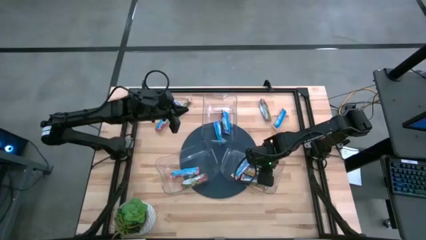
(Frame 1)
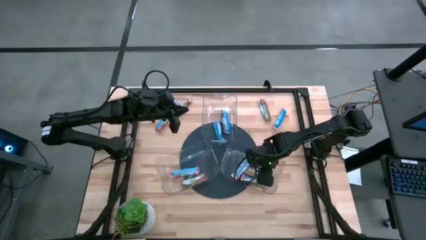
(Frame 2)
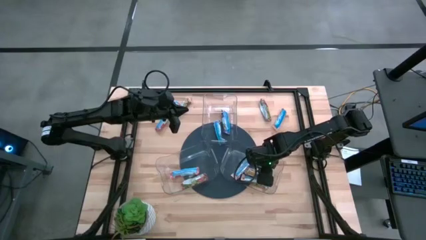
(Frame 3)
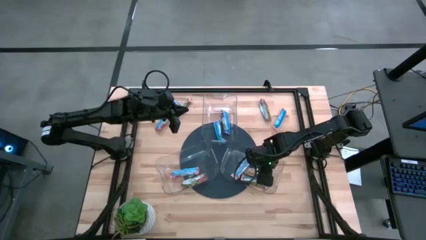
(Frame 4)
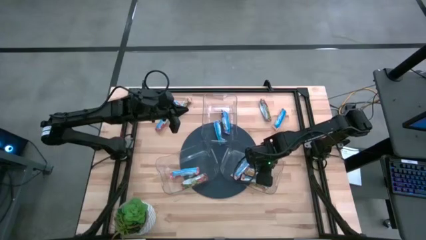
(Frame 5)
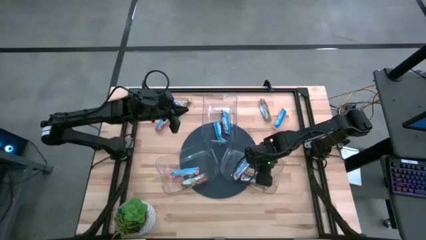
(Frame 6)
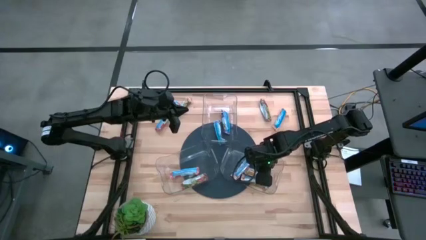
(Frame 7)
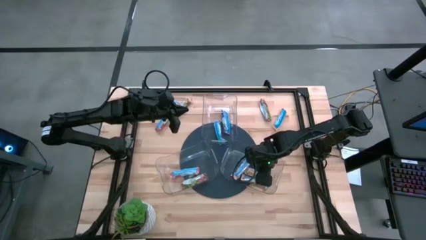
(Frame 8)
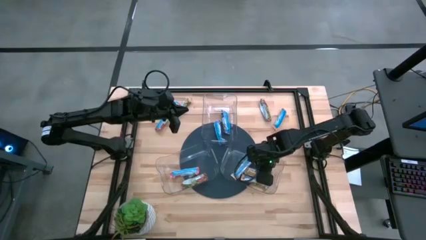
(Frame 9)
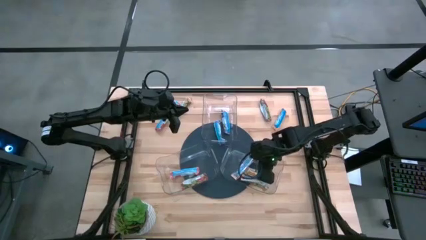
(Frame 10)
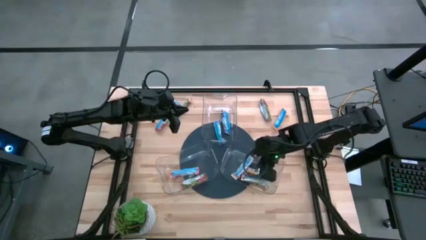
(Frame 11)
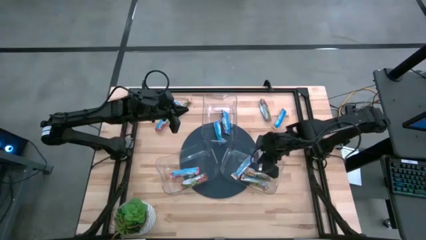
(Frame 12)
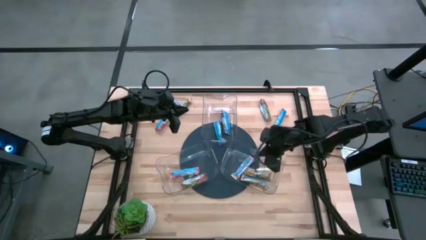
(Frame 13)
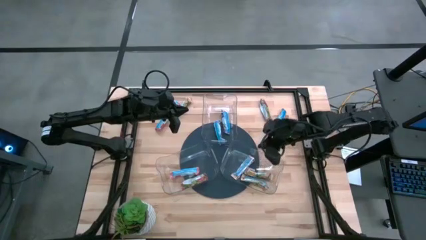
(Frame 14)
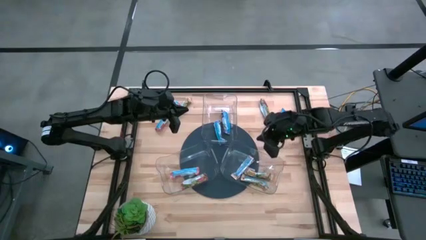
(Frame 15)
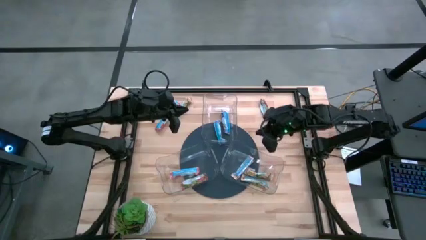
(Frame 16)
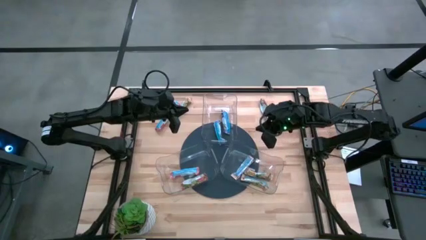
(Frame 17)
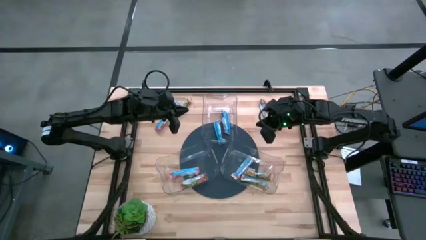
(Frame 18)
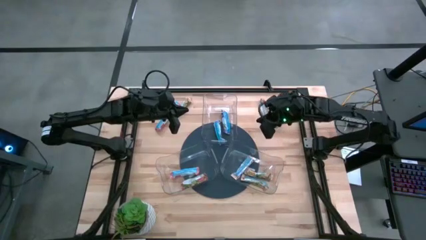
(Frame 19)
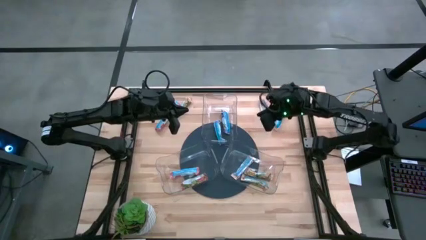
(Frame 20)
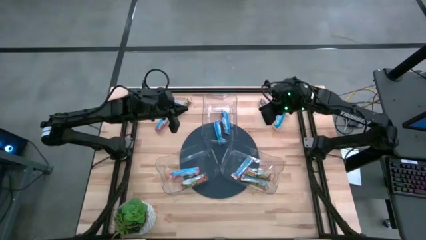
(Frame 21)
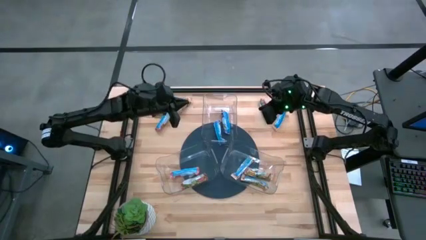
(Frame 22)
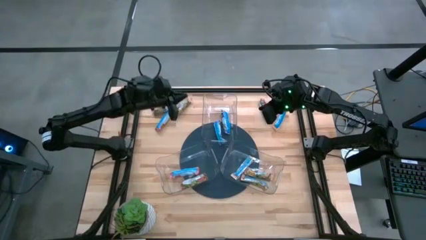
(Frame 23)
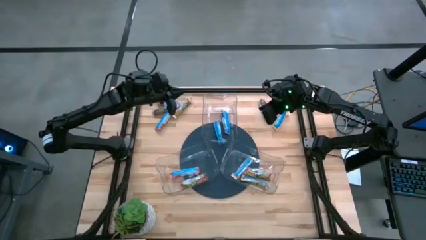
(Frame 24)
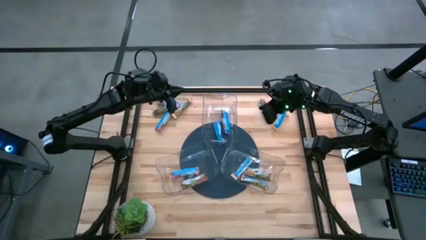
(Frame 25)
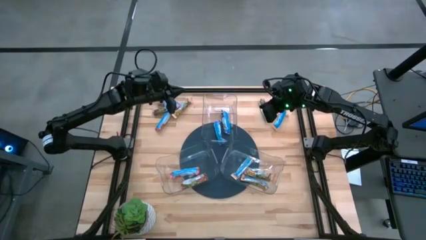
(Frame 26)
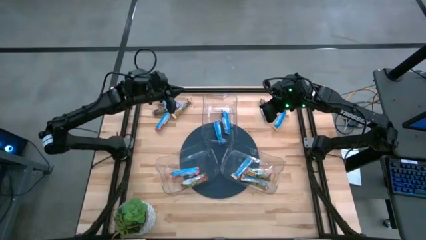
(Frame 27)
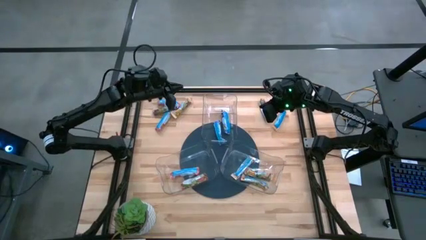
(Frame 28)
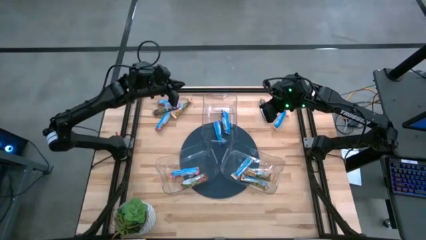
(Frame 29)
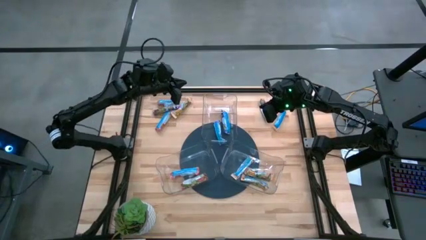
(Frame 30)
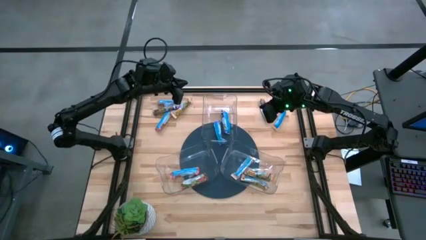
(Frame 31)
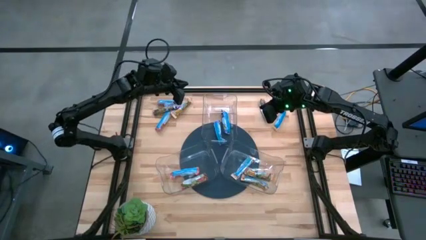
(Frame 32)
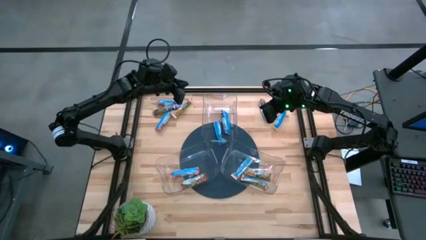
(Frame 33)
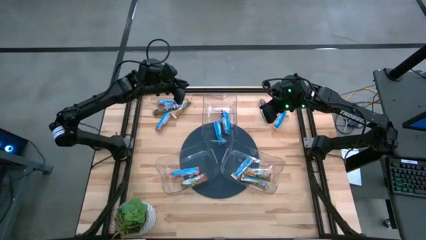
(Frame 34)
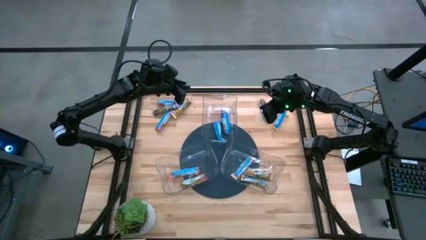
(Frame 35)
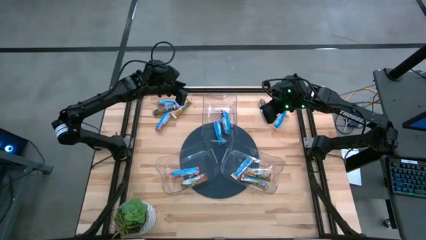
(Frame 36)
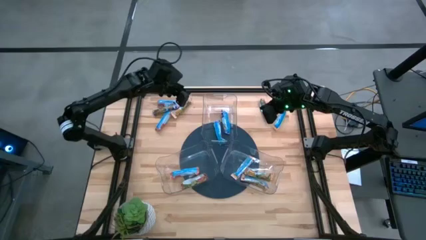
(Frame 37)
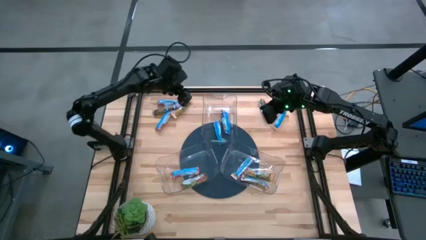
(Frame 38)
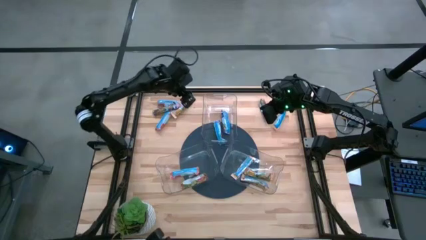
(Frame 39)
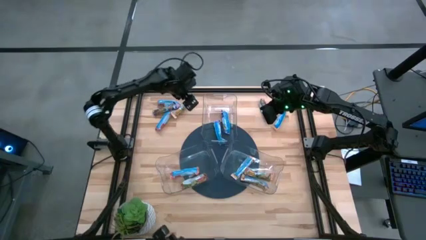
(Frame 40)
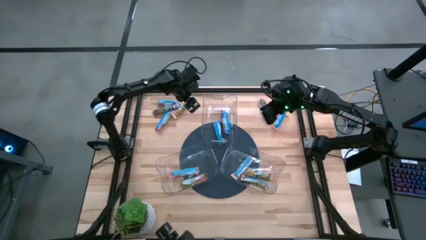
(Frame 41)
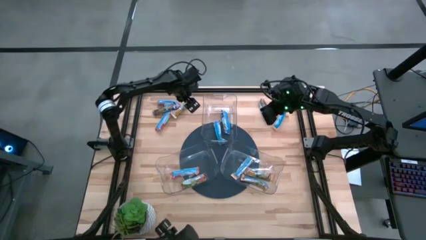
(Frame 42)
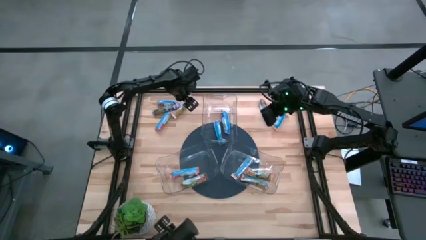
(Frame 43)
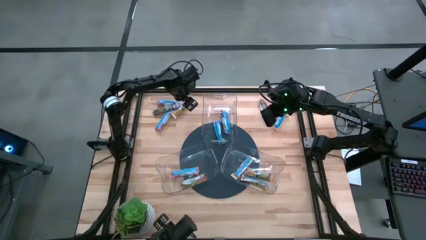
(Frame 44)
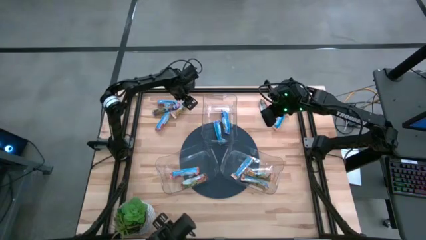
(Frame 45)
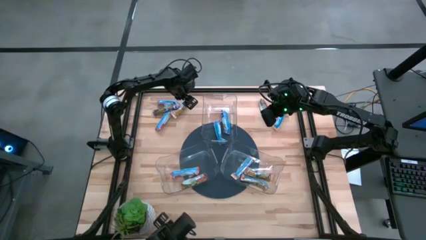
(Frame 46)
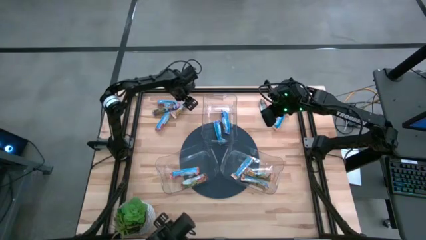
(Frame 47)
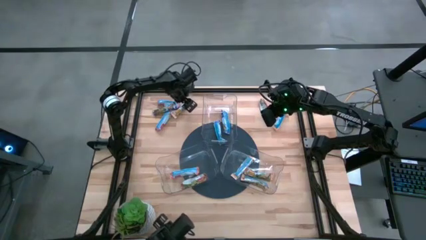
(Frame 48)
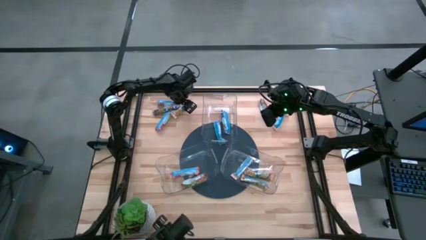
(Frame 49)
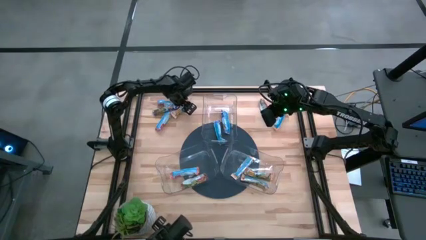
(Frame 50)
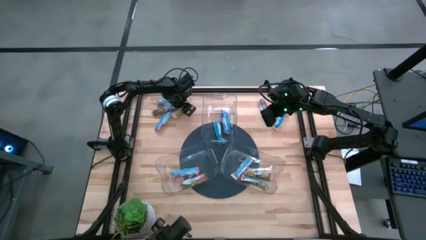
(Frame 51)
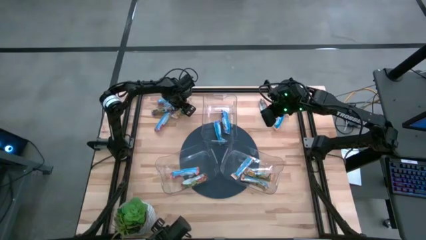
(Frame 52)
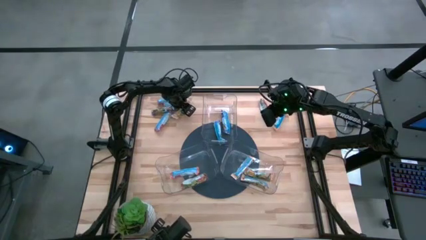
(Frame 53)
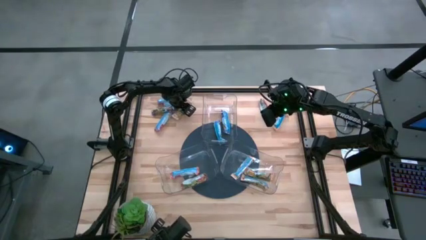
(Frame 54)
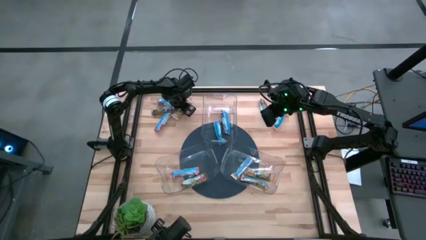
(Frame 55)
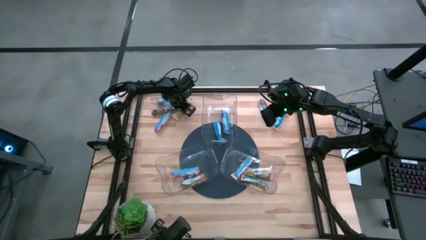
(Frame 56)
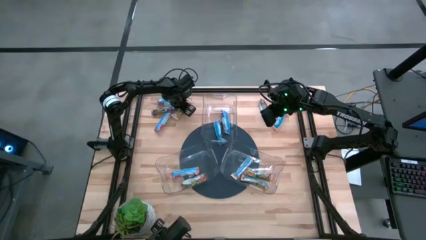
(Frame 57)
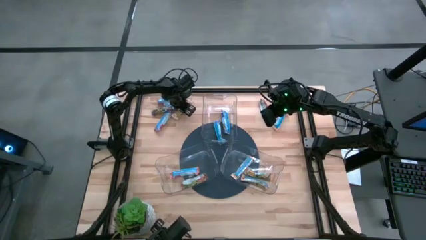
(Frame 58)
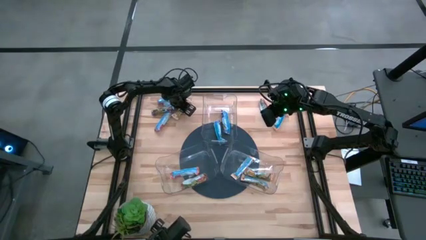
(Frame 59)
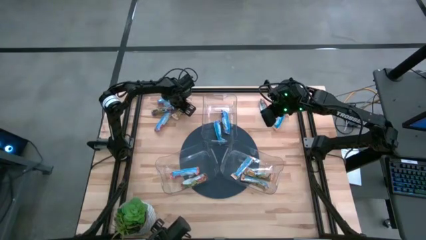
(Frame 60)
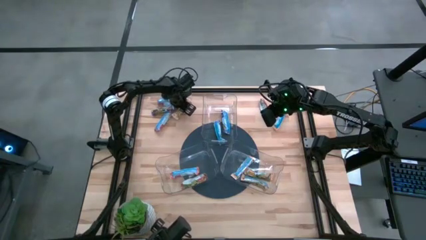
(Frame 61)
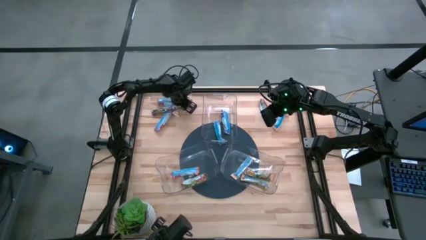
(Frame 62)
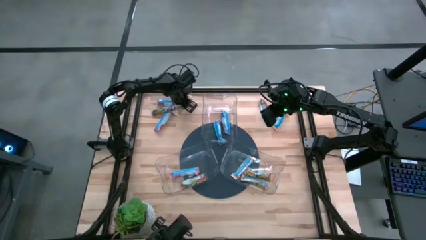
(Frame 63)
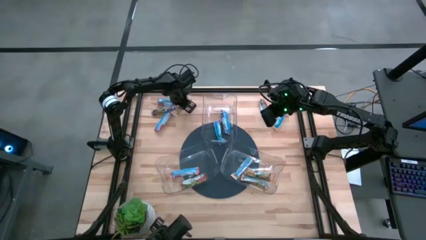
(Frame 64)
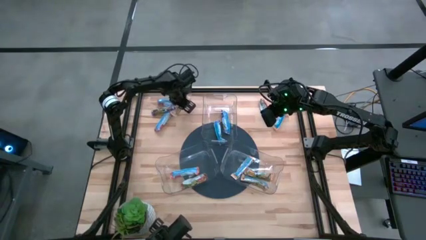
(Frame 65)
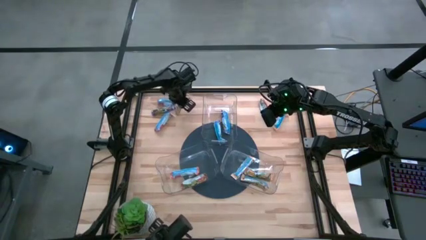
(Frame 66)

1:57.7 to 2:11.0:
Task: Pick and place Granola Bars by type
Put the yellow granola bar into the right transparent bin

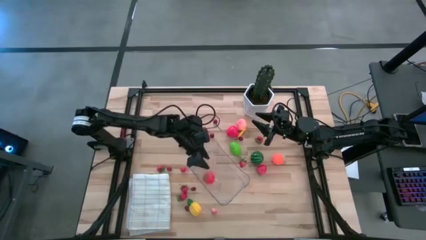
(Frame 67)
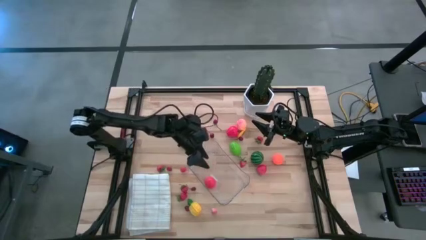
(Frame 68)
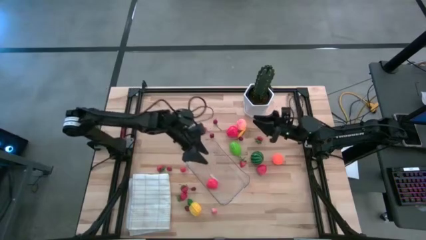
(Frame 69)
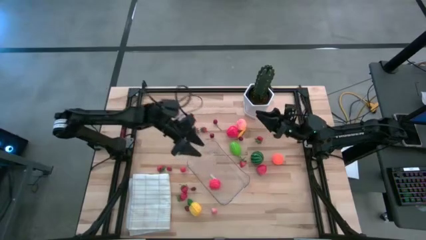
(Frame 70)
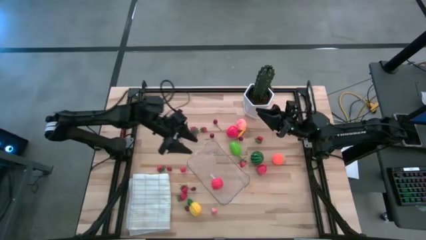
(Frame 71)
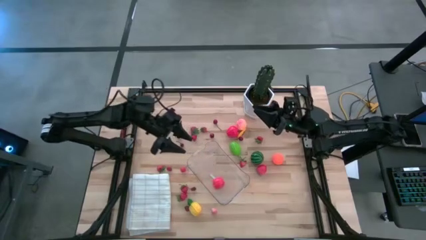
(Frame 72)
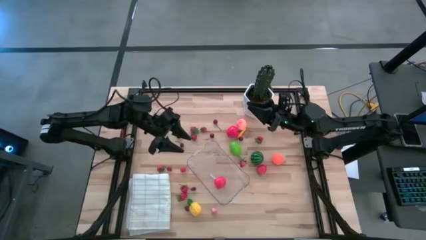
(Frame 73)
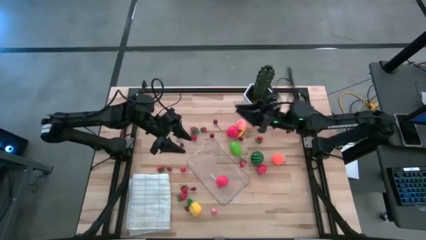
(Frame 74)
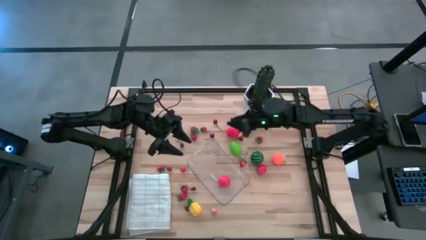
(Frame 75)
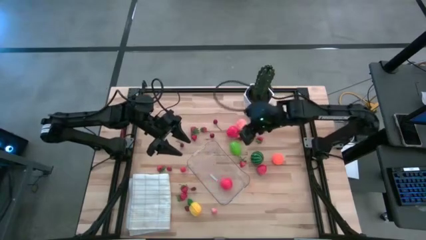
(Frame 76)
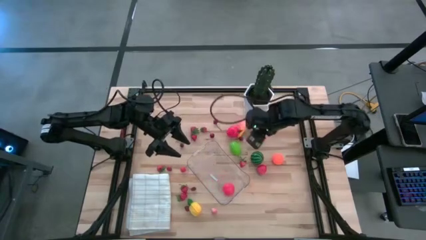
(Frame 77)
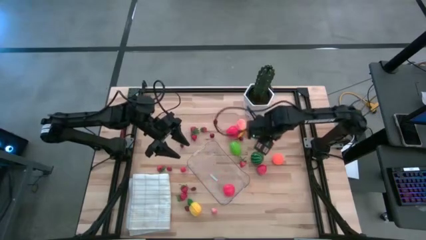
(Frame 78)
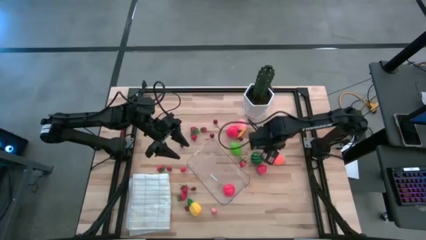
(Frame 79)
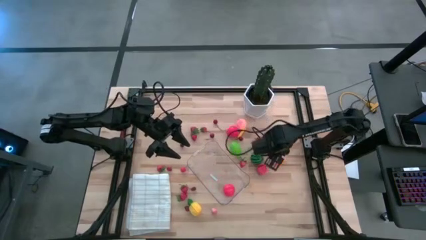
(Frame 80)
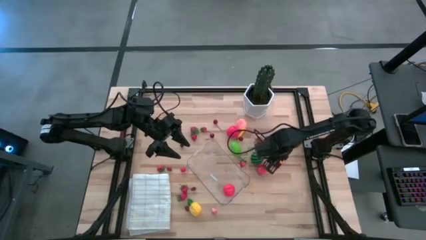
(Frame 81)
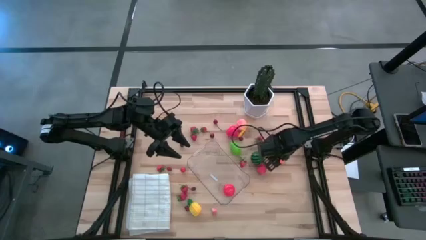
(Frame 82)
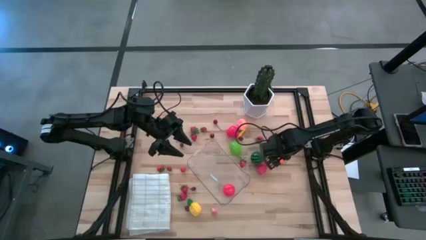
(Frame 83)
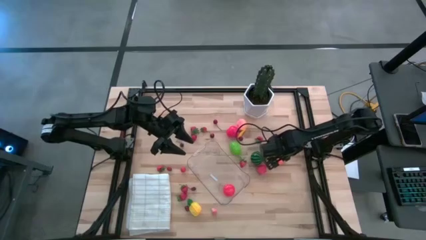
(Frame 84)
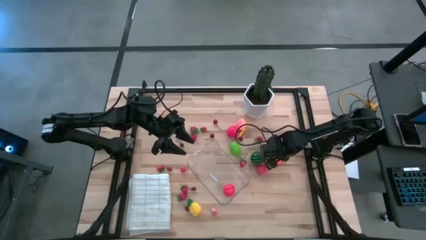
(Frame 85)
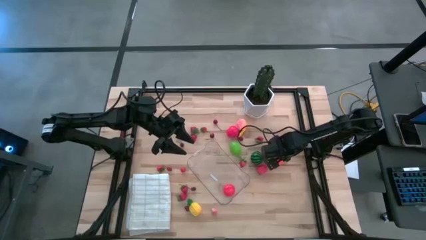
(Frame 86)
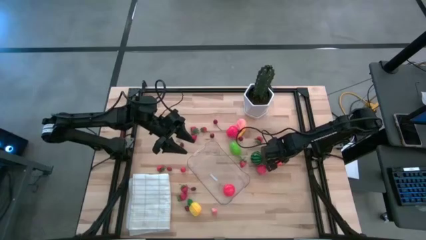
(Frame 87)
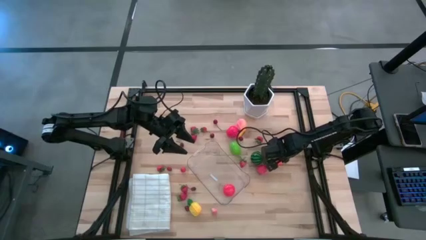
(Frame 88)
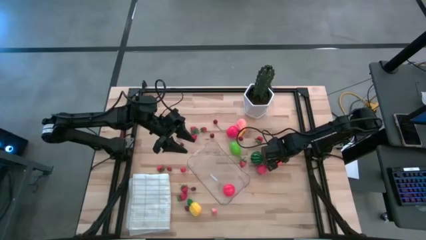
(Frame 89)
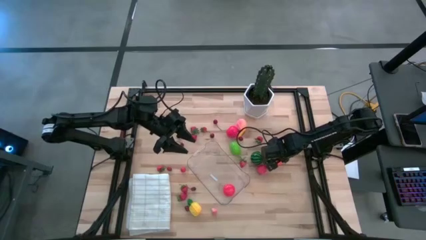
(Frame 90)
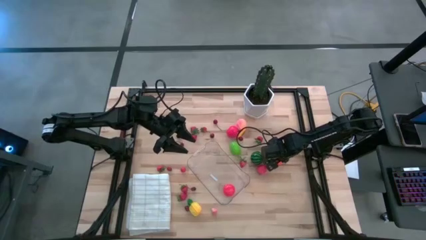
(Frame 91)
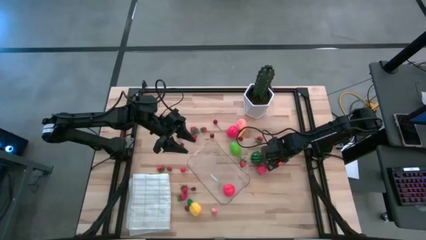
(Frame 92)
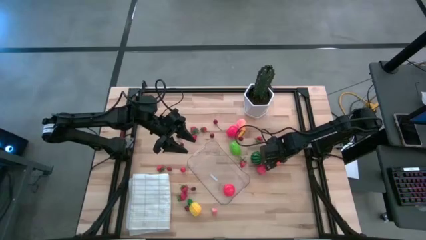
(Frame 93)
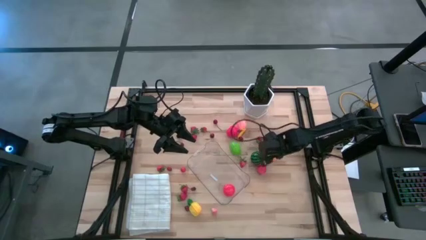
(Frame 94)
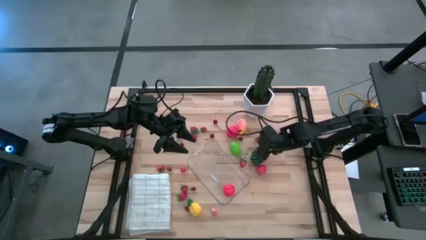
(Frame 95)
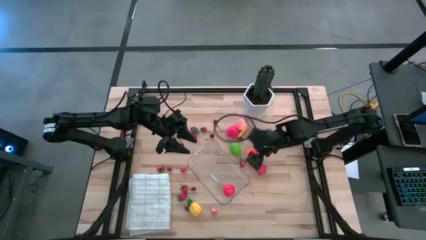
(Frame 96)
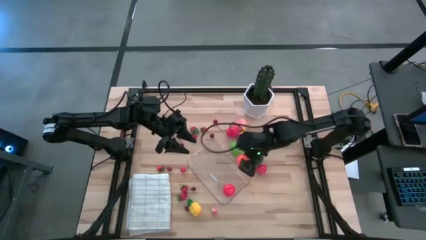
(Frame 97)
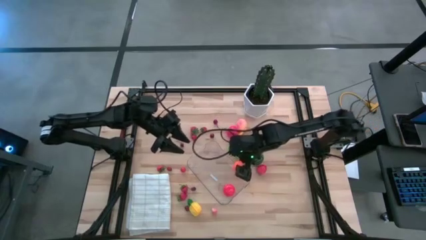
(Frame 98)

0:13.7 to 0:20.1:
Task: Pick and placing Produce into tupperware
Put the orange pumpkin into the transparent bin
